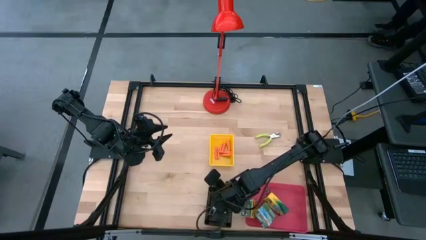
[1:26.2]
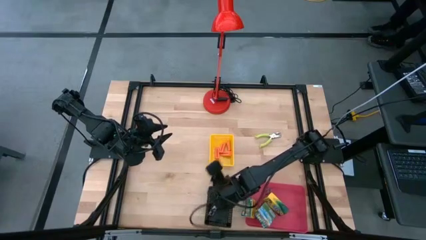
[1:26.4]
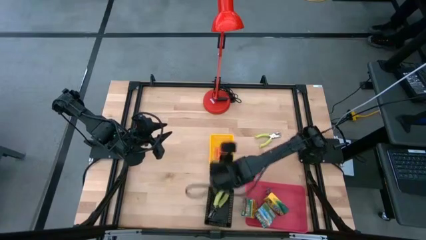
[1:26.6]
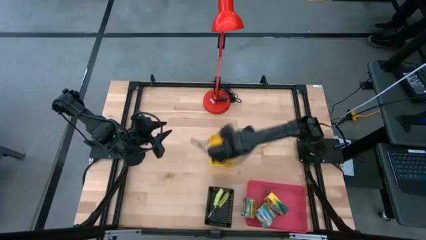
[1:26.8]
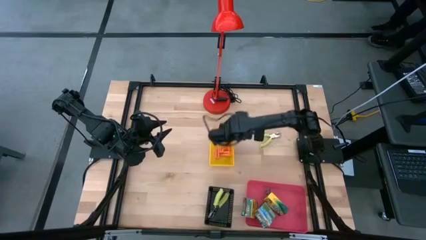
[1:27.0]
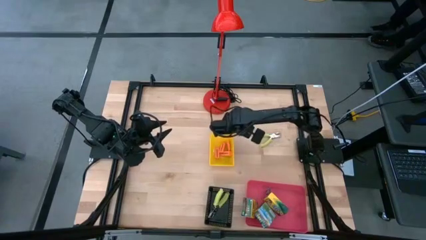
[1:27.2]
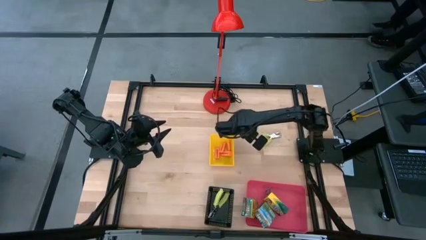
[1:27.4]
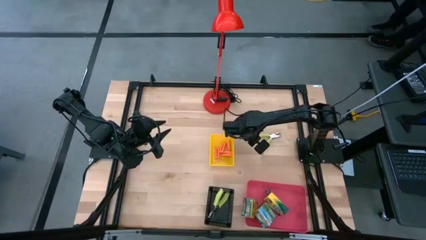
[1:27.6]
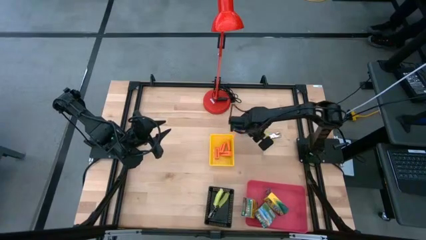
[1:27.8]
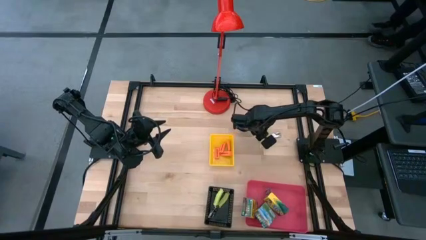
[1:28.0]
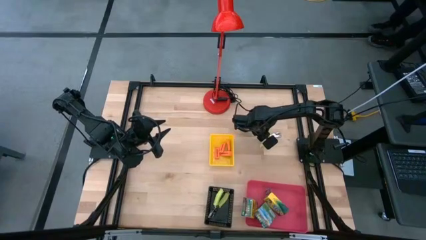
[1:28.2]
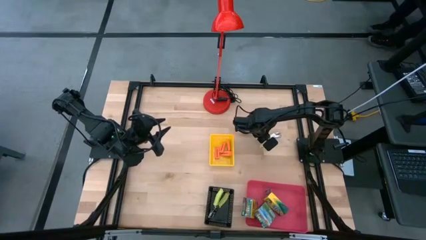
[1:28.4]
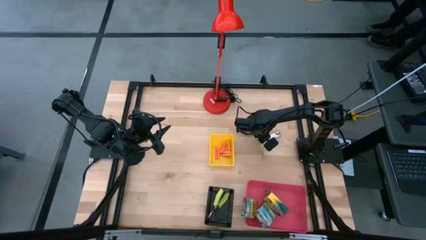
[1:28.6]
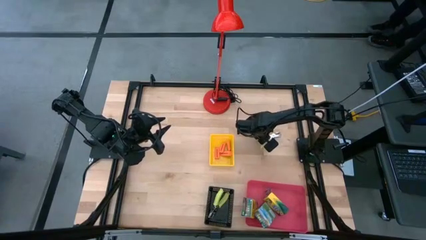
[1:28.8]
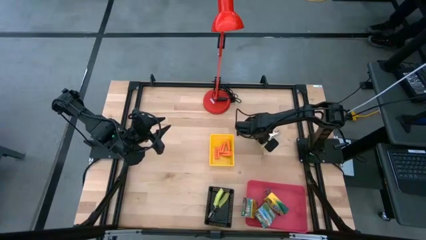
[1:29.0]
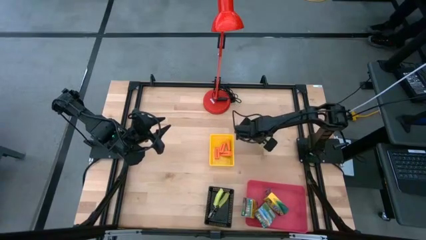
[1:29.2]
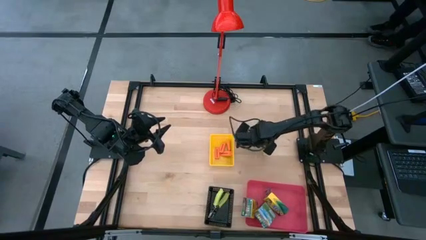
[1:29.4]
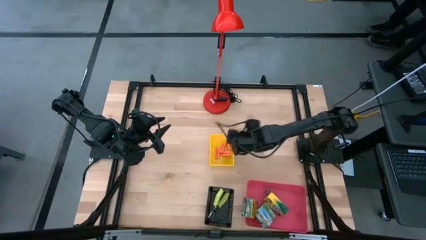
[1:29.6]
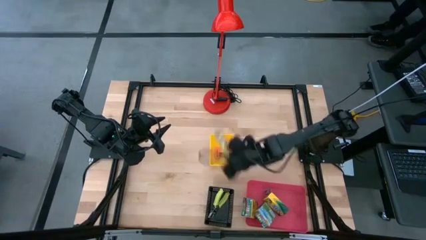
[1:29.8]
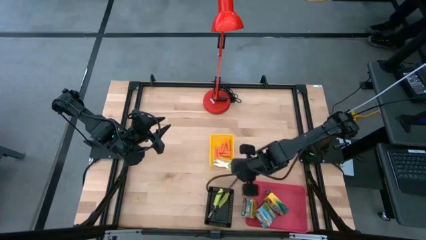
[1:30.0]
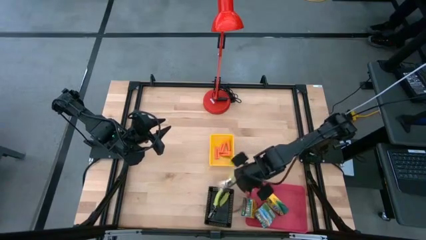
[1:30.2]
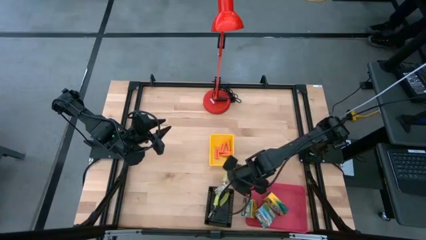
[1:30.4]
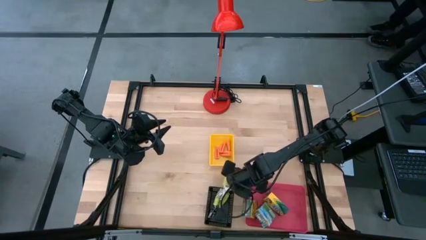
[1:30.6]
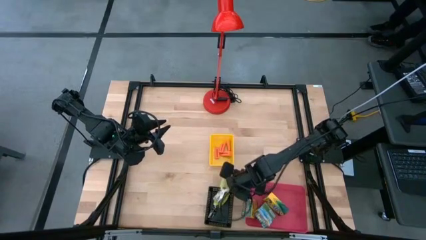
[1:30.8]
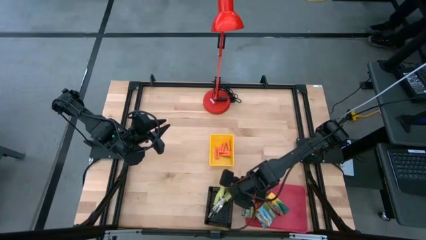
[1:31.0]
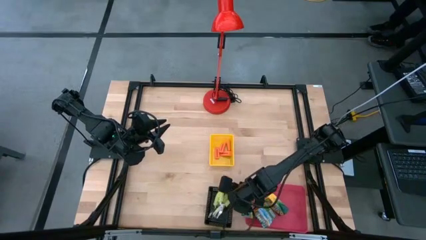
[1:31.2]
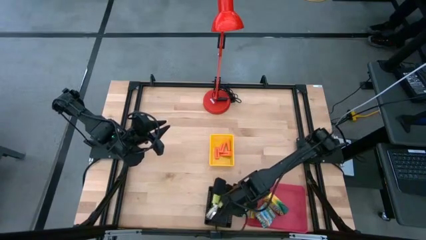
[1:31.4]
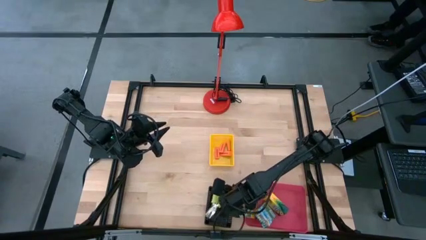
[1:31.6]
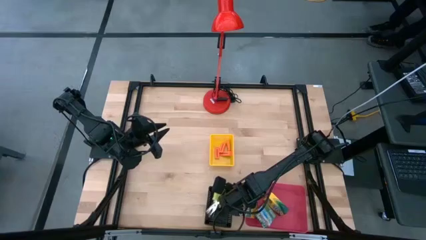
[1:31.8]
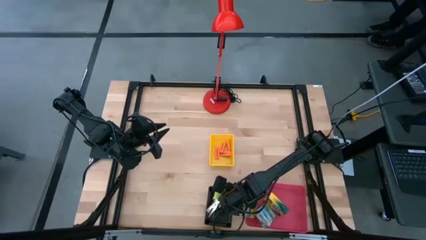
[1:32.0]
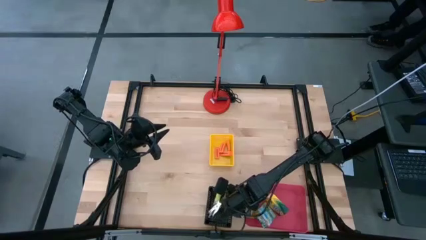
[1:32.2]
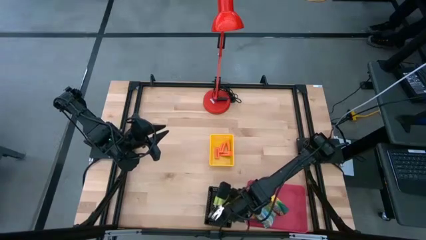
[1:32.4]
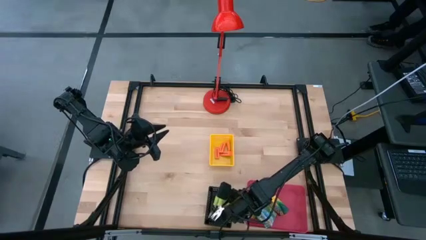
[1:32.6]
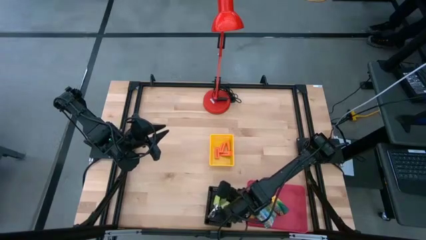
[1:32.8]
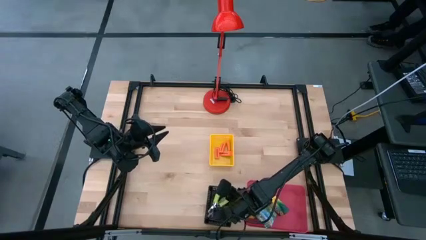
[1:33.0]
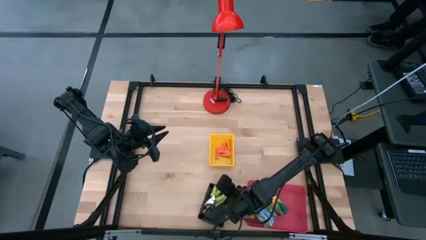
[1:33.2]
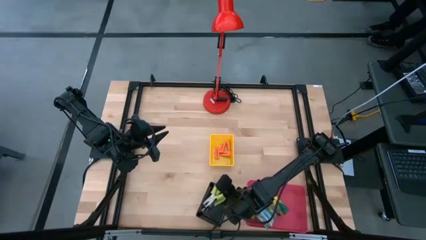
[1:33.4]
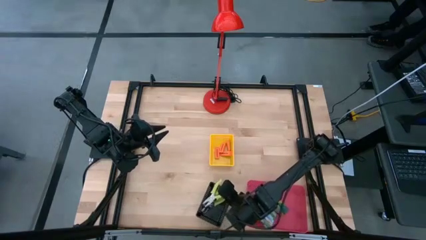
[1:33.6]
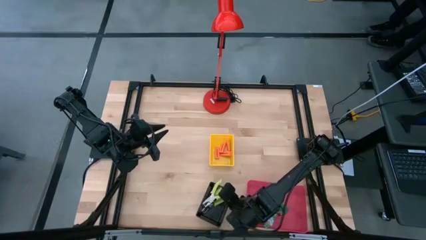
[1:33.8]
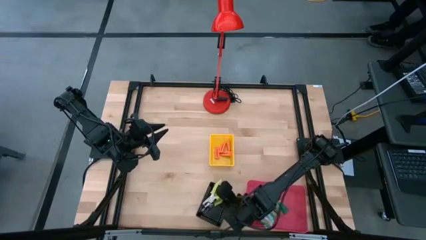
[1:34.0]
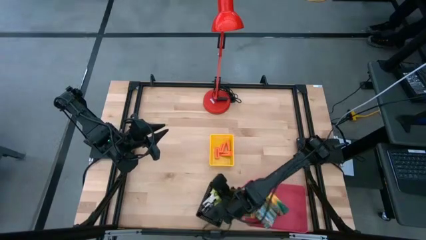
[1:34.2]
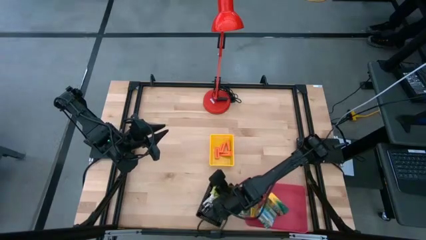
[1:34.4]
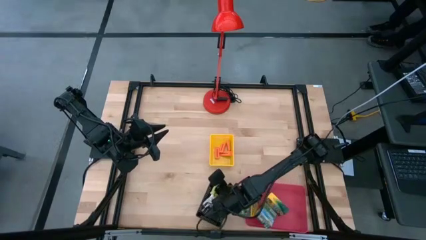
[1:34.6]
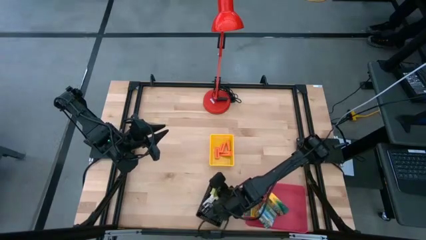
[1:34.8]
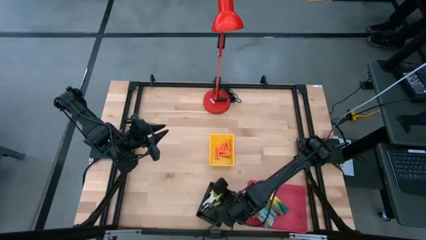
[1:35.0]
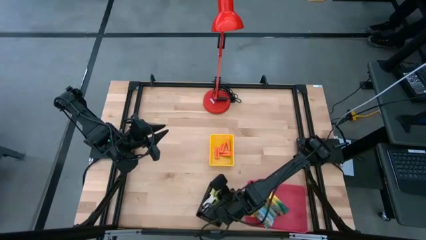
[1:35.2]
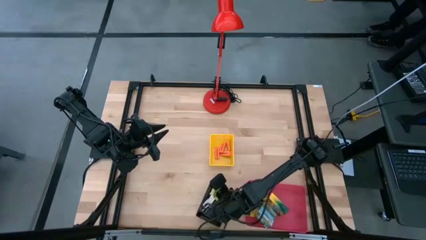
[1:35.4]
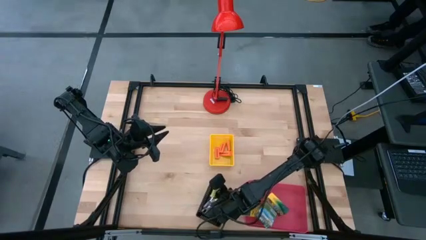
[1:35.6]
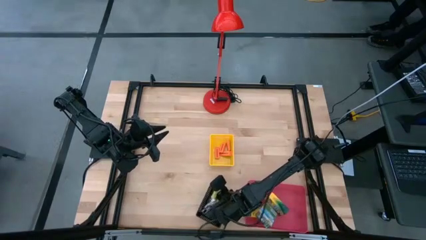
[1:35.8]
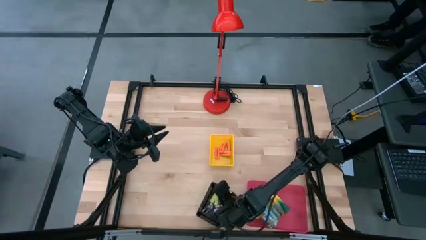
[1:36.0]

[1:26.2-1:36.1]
Task: Pick & Place School Supplies
Put the green hole puncher into the black bin

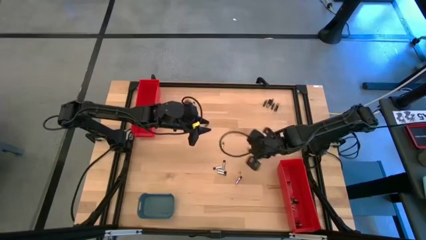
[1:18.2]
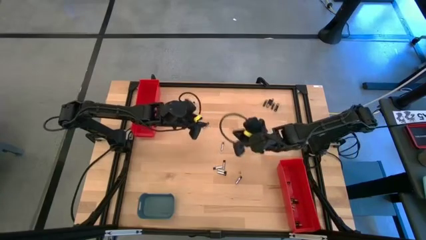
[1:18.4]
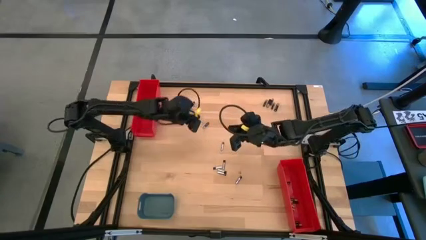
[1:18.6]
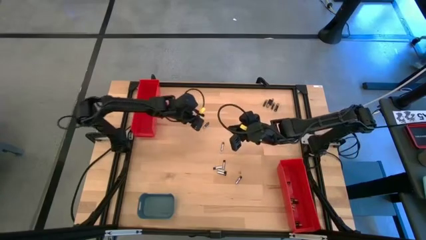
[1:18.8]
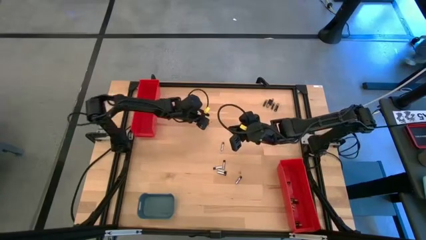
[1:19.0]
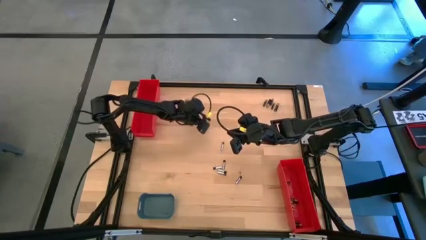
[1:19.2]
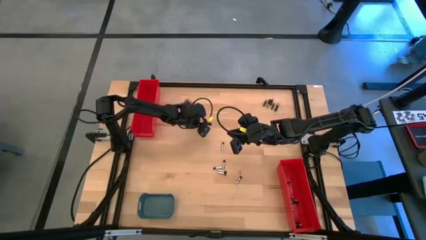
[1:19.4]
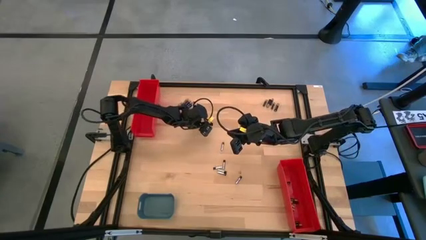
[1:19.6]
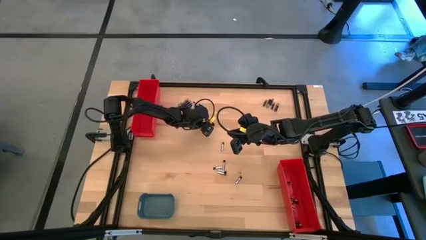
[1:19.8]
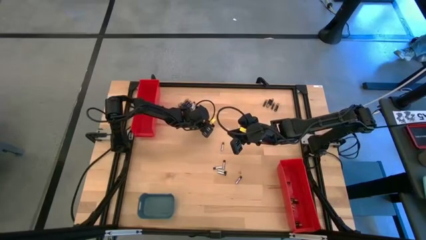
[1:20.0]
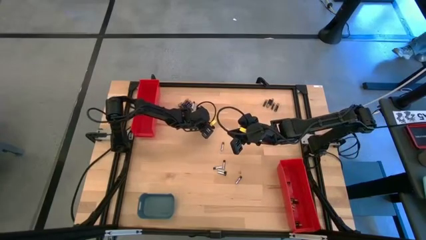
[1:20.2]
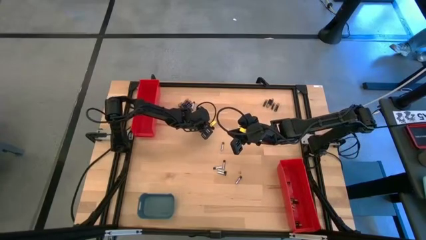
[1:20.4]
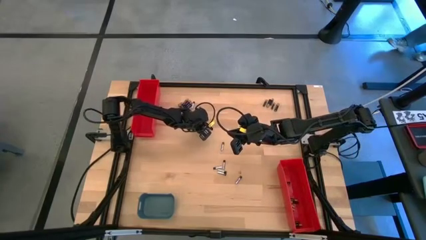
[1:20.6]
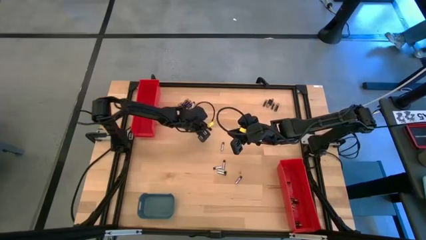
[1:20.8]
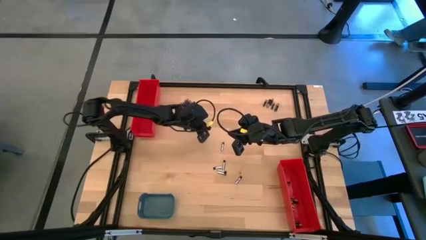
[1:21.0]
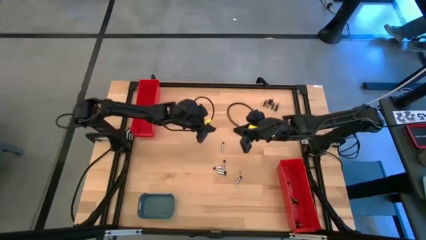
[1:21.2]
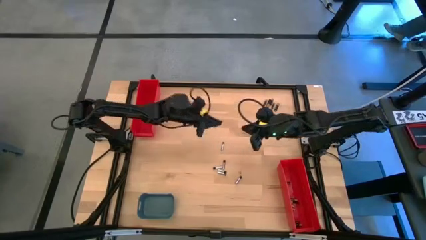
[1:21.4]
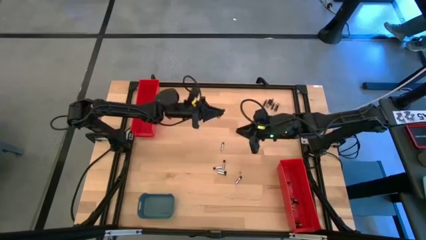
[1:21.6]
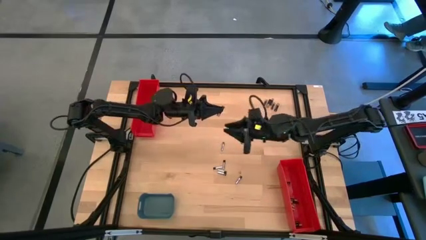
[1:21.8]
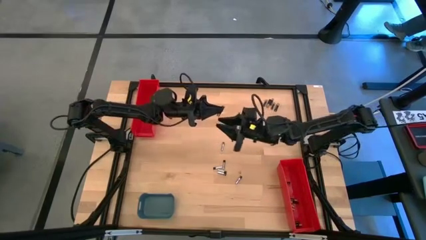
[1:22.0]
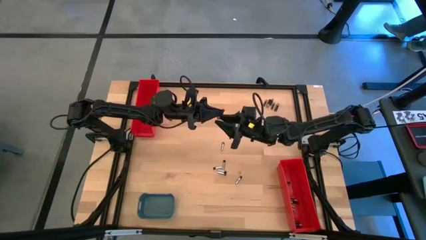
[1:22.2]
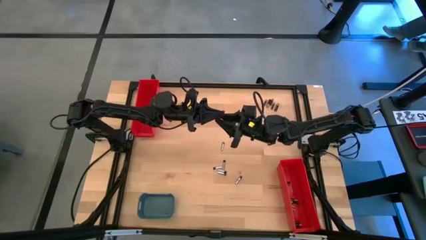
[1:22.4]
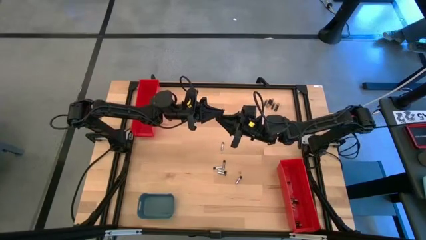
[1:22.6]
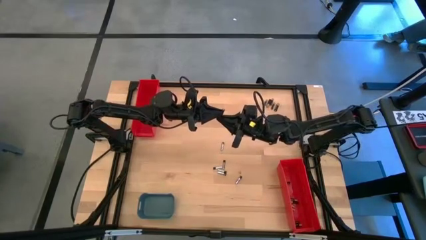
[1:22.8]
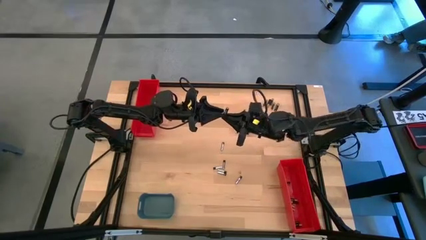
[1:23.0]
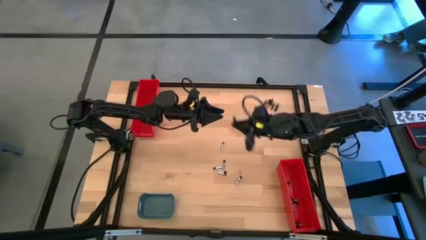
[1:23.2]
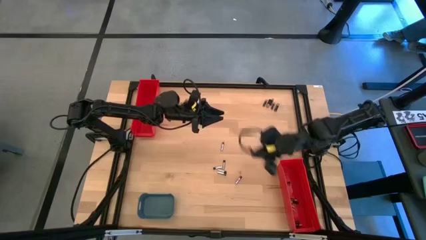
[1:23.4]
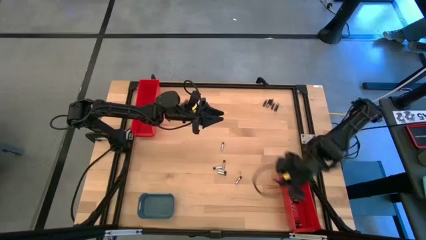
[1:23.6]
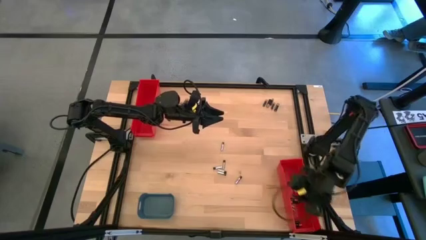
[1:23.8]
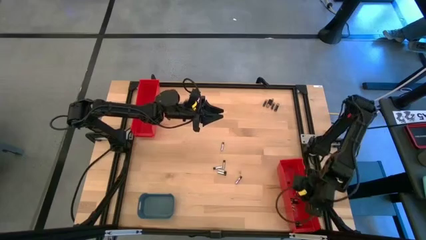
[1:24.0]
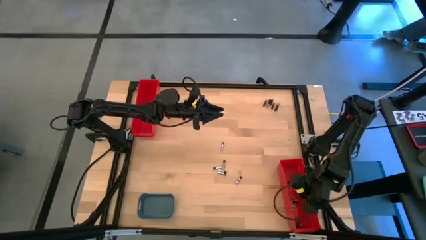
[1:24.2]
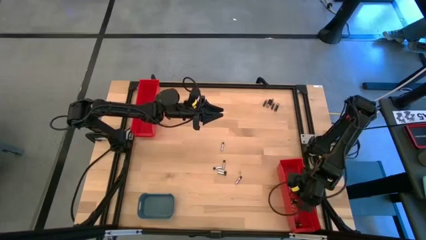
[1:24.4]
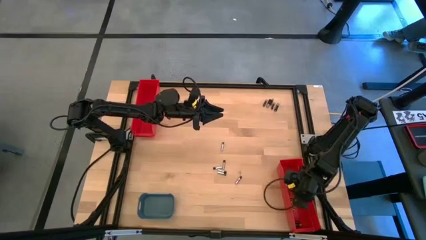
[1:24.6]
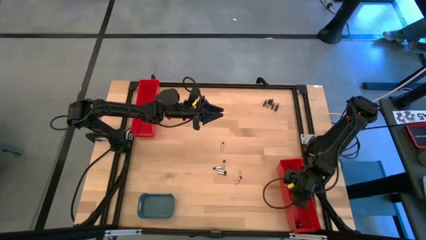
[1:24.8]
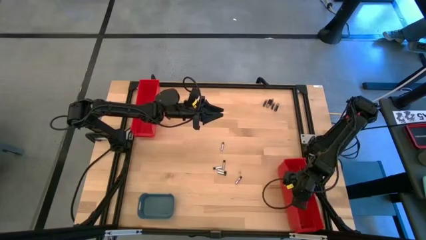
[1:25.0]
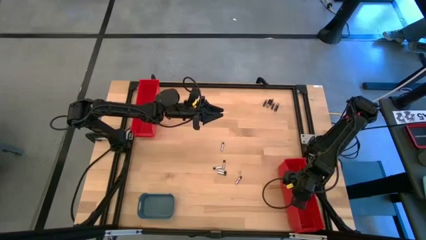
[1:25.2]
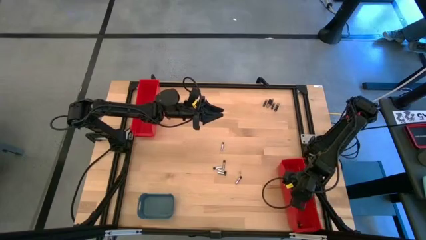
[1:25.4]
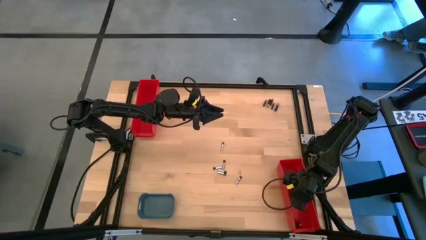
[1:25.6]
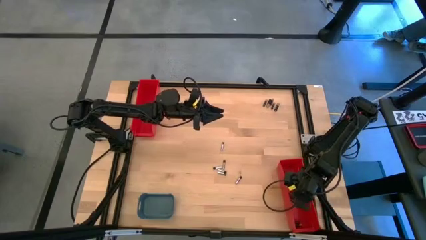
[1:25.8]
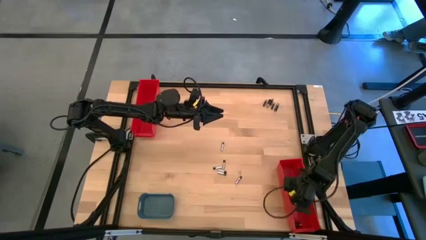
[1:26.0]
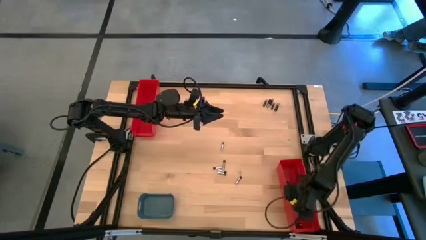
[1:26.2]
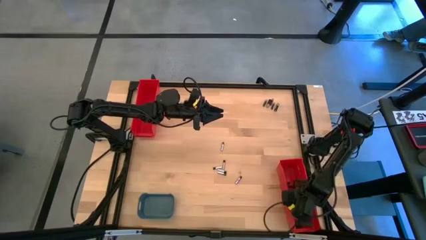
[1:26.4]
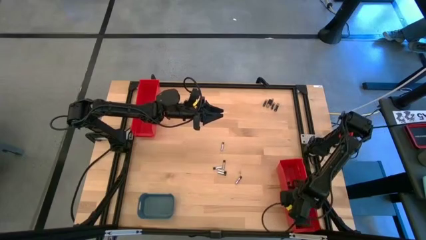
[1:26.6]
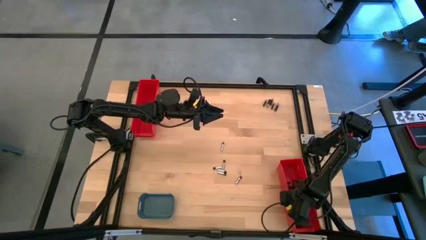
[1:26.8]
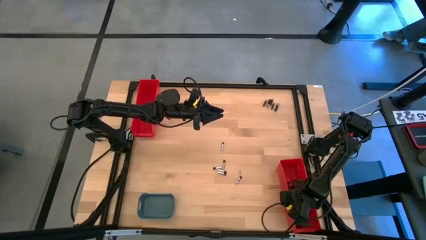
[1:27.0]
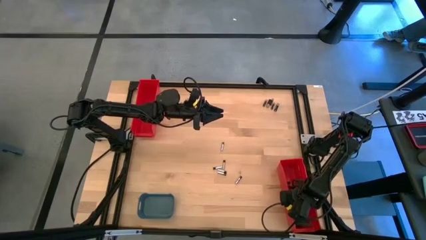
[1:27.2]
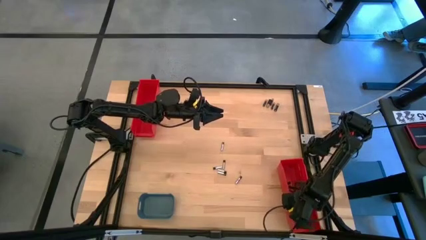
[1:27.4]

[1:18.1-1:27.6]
Task: Sort batteries
Put the small black battery into the bottom red bin
